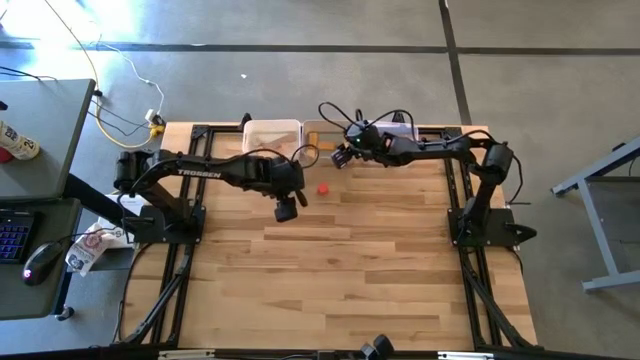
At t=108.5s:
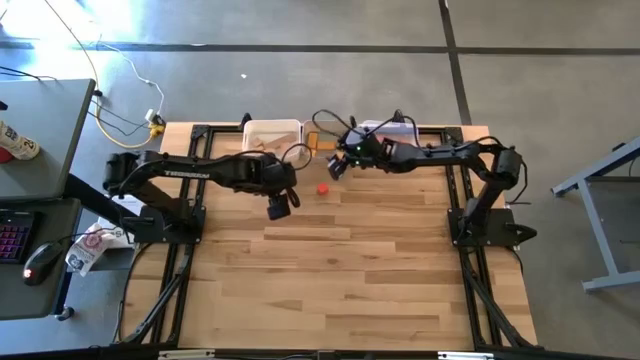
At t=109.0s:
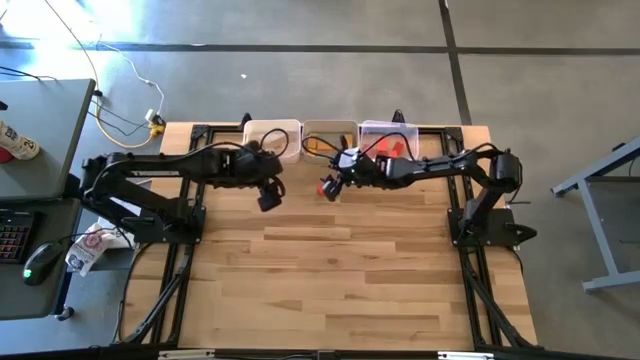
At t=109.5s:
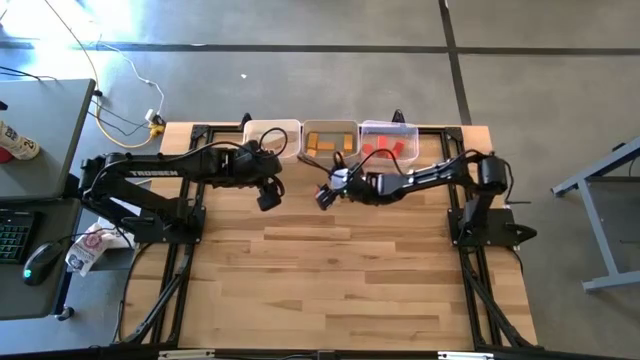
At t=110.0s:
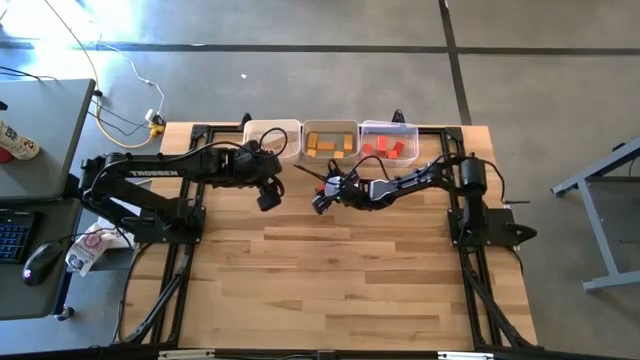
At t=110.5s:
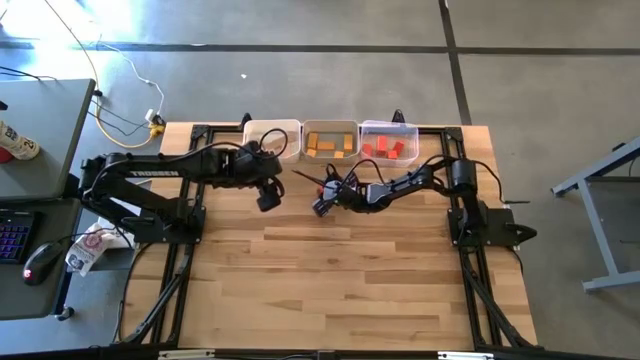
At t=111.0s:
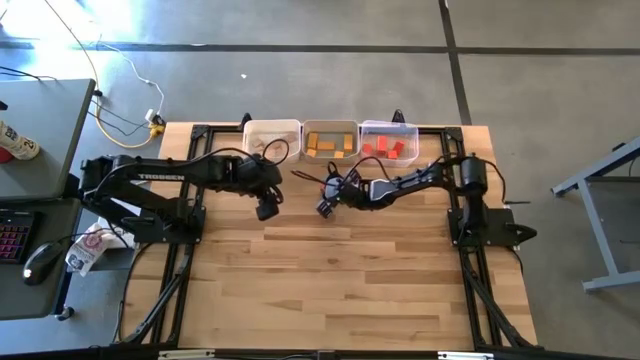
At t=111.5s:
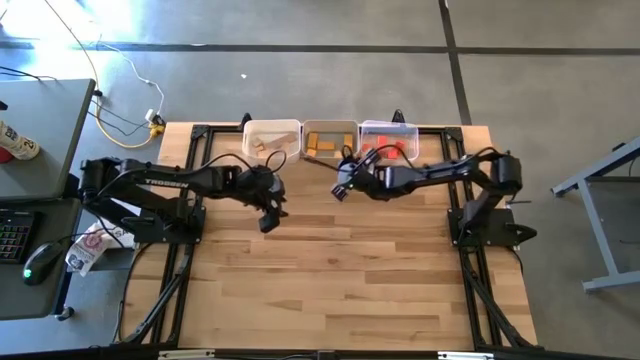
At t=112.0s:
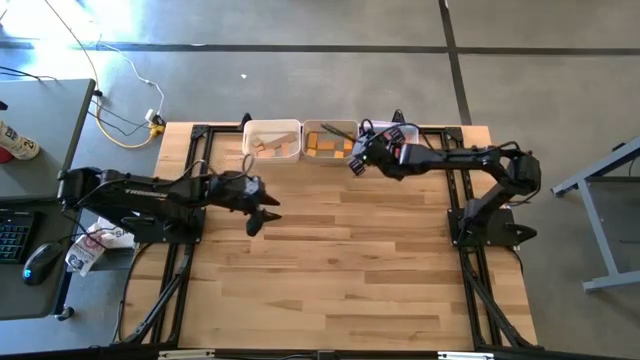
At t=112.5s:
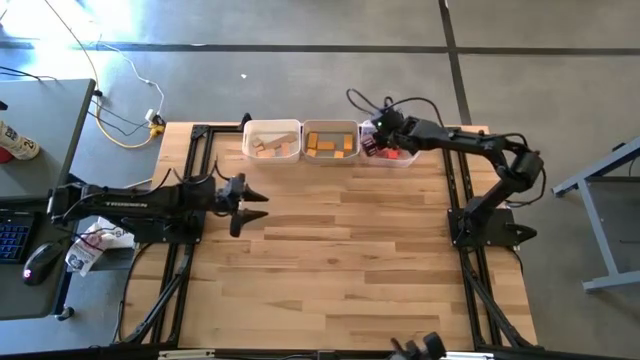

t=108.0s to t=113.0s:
Task: Sort & place blocks by color
Put the orange block into the transparent bin

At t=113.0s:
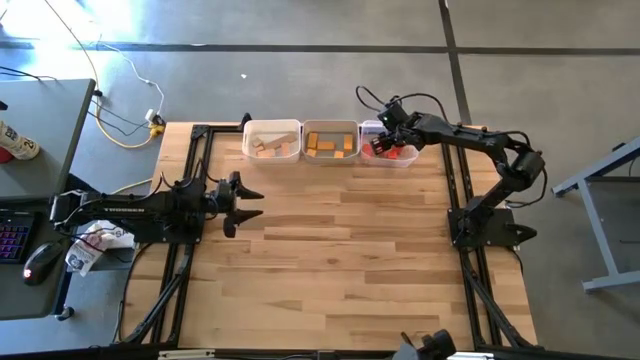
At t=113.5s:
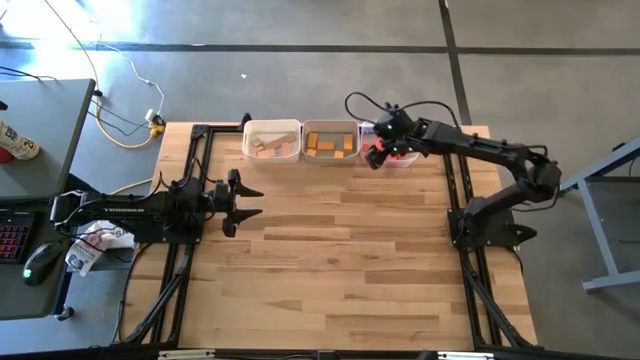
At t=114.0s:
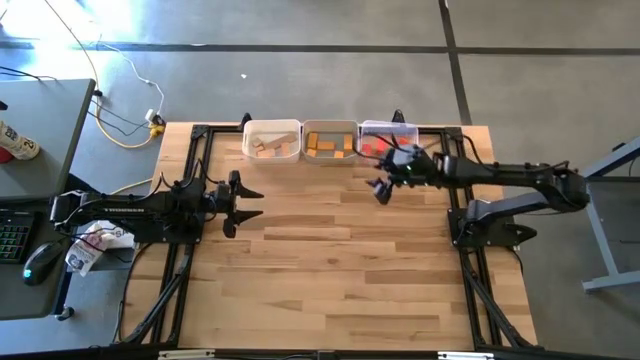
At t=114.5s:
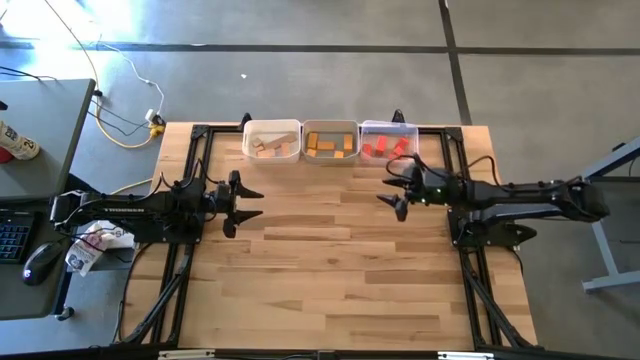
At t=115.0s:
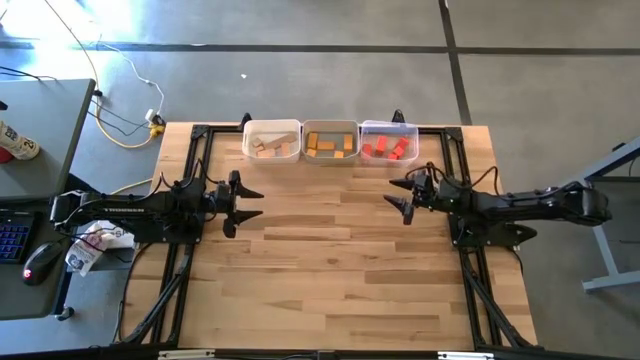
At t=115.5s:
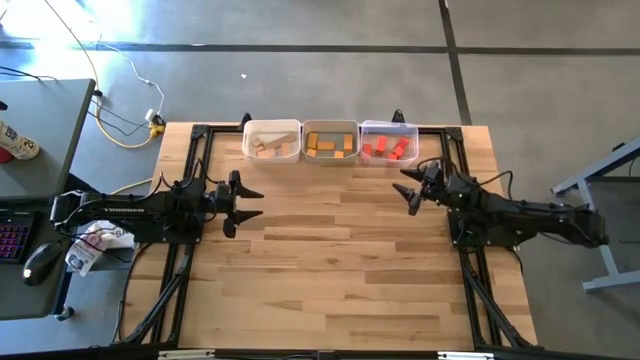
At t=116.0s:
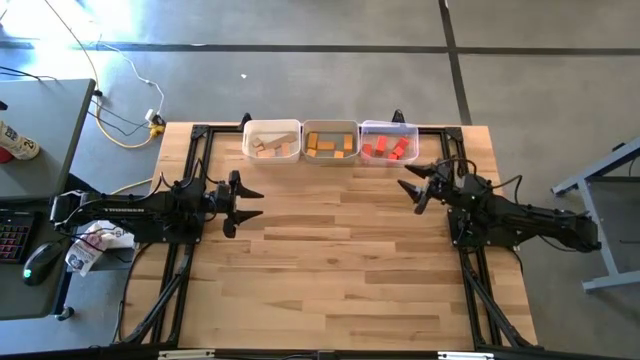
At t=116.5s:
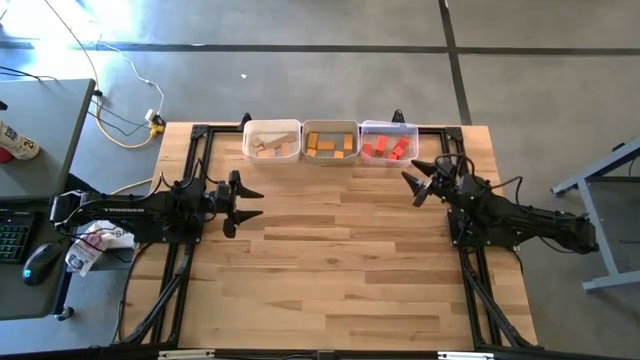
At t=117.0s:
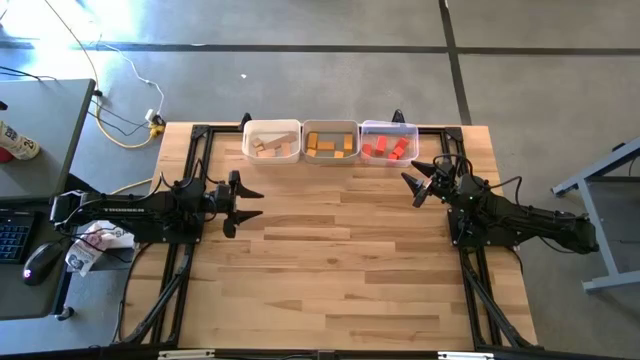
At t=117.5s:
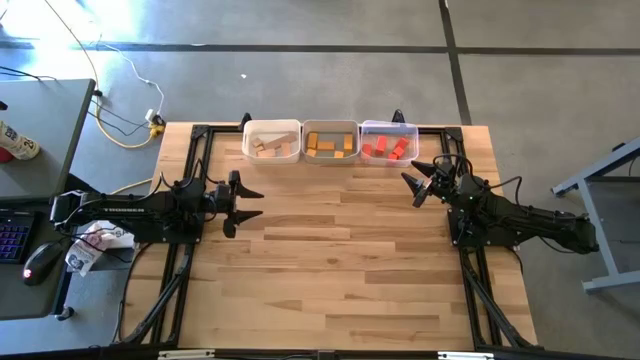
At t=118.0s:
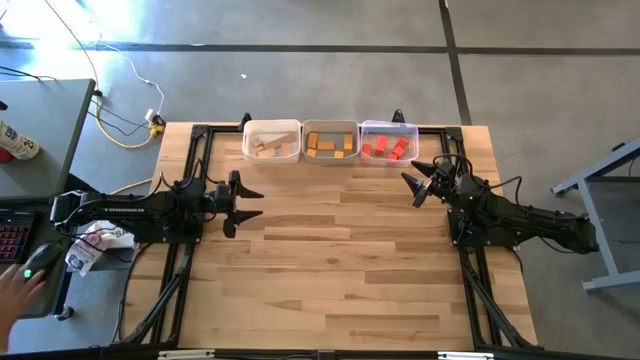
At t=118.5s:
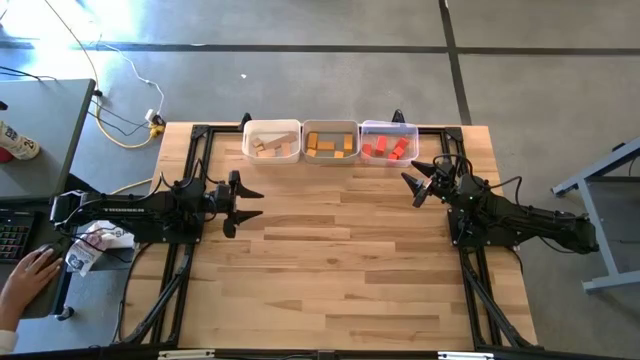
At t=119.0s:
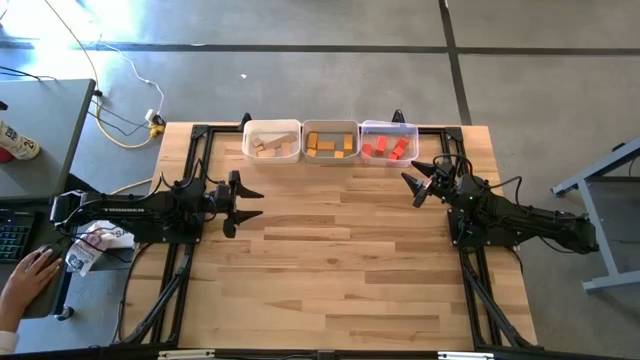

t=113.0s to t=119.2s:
Return to Home Position

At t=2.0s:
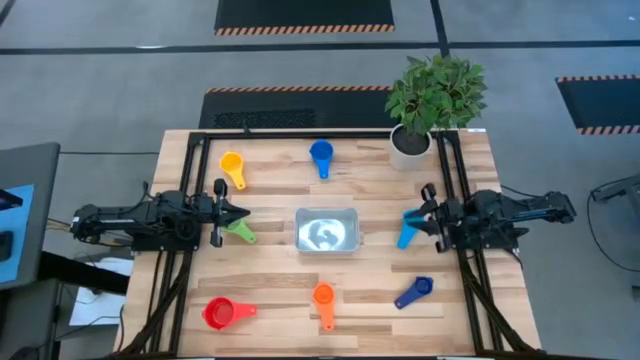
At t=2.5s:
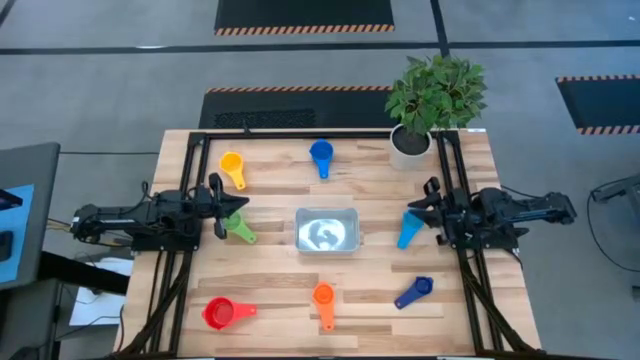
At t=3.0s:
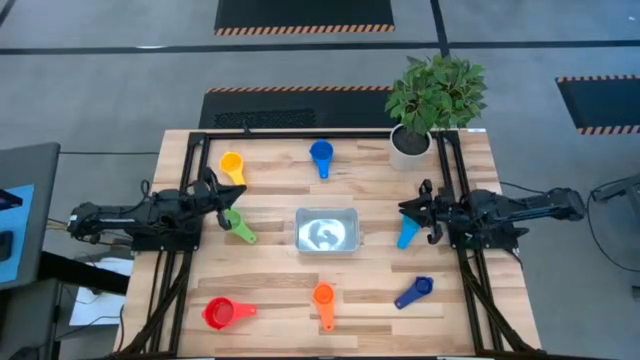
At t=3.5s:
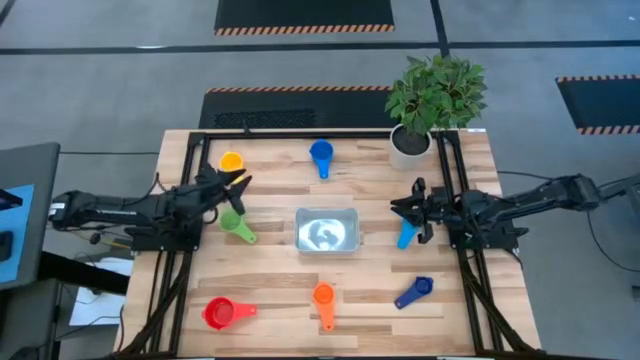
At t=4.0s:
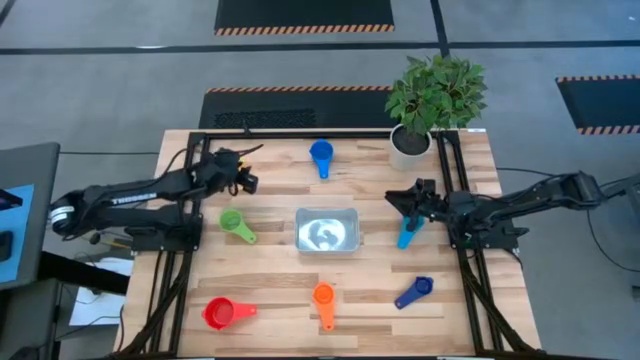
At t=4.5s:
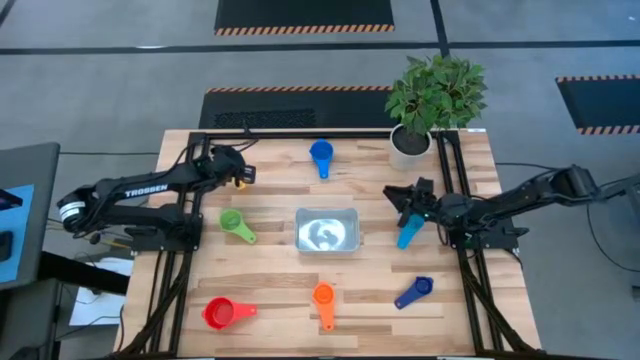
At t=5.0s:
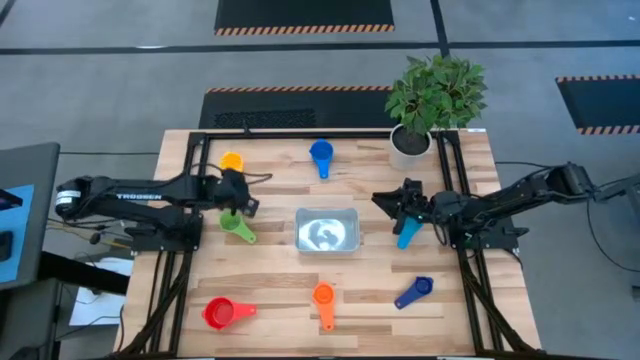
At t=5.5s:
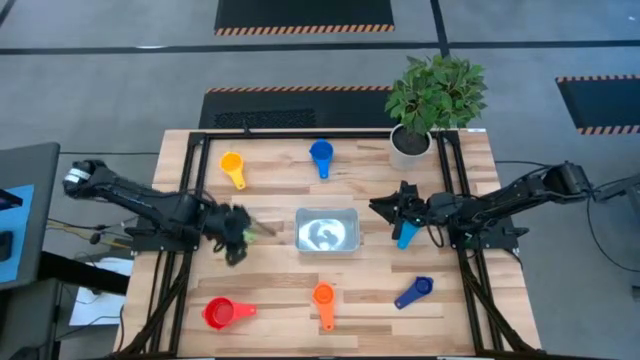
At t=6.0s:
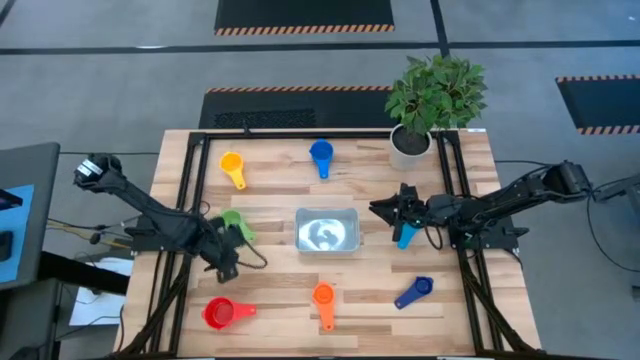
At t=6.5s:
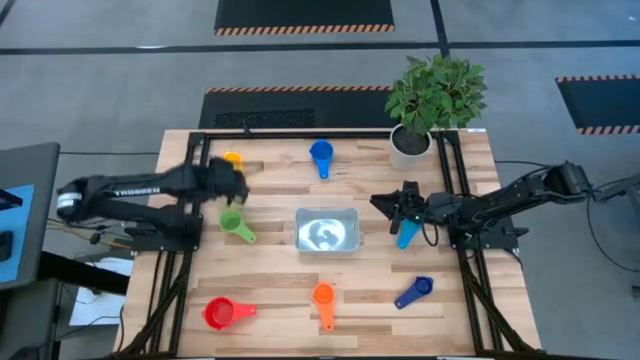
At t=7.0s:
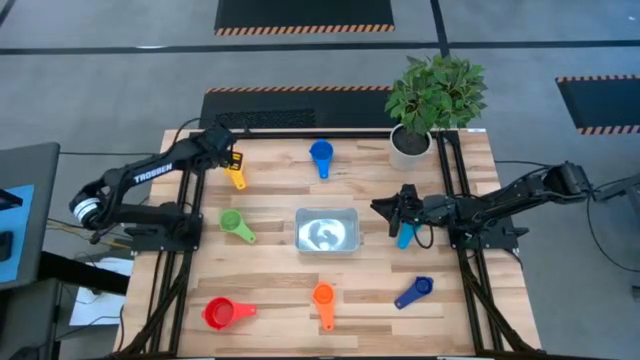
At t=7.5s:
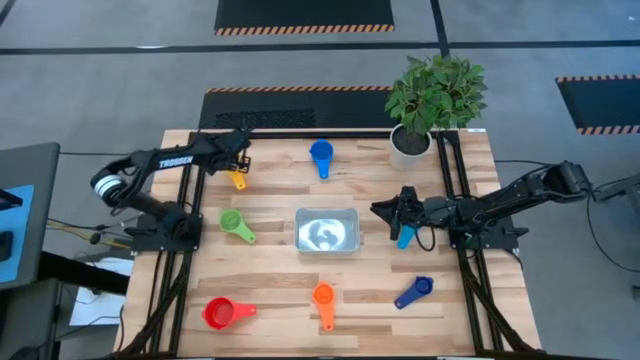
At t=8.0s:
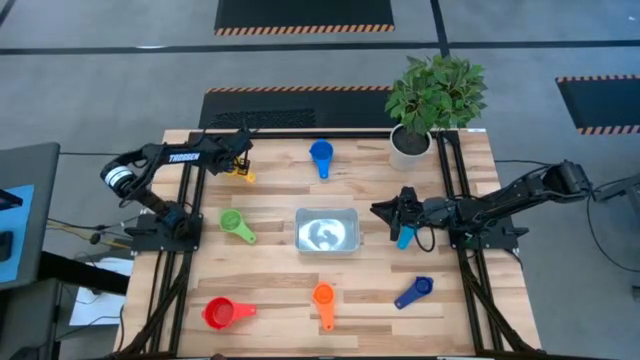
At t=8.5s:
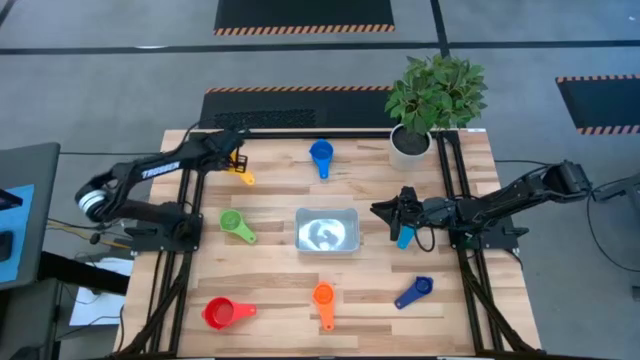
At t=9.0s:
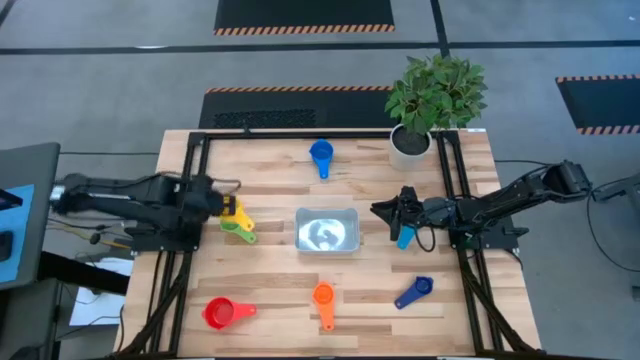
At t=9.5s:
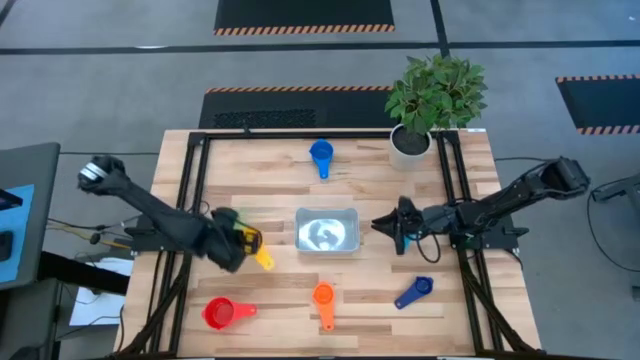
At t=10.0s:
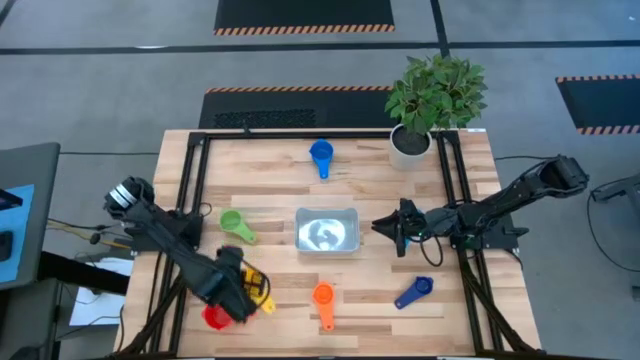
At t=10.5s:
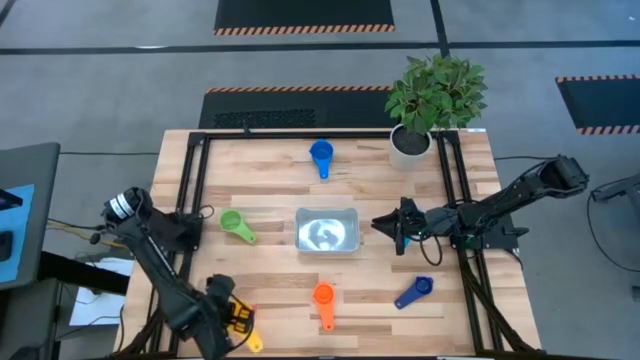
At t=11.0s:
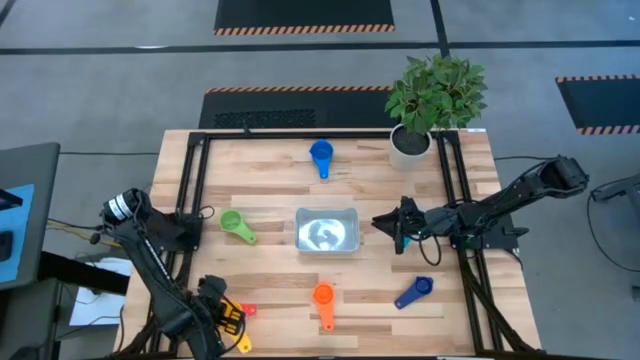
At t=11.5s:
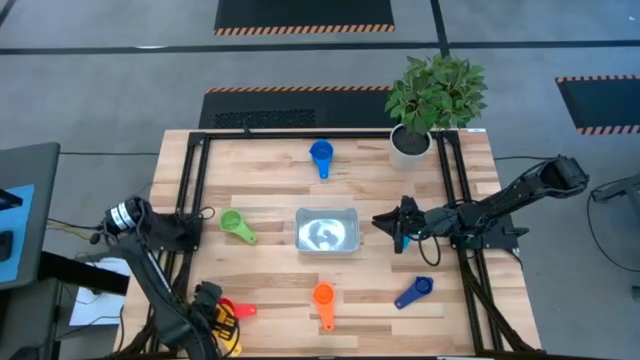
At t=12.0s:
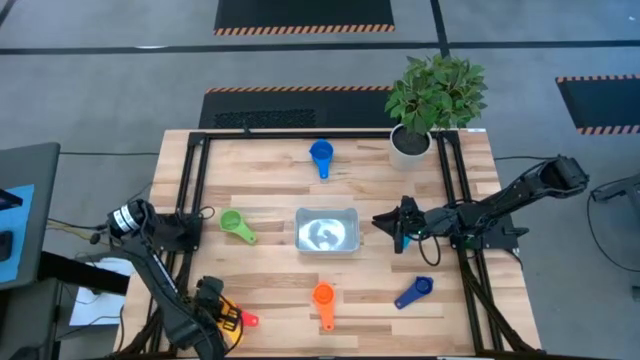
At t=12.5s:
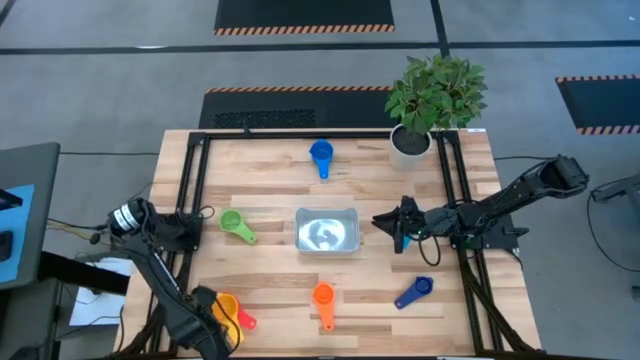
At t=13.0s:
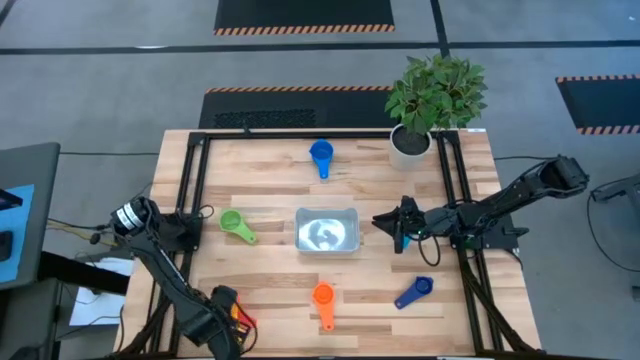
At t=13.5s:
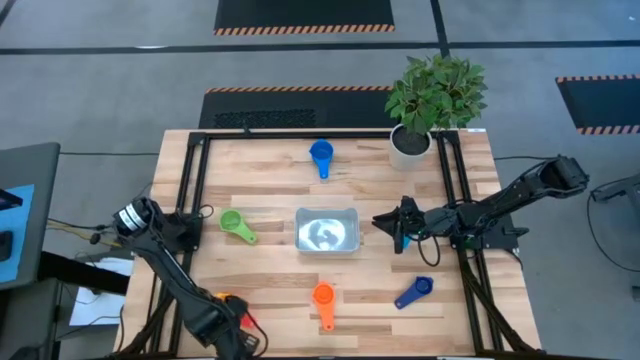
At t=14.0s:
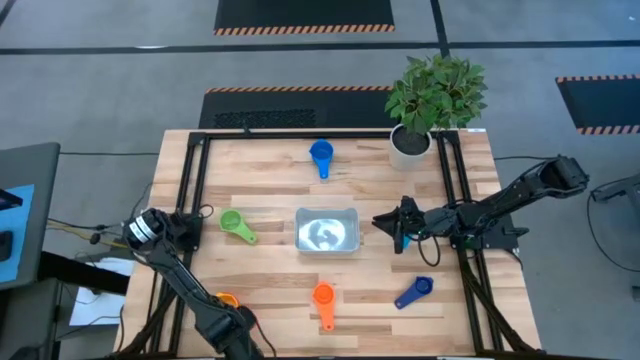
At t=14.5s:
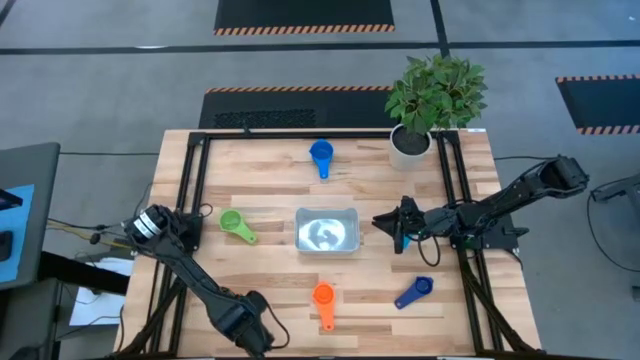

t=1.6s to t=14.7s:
Task: Nest measuring cups in basket
Stack the yellow measuring cup on top of the red measuring cup
